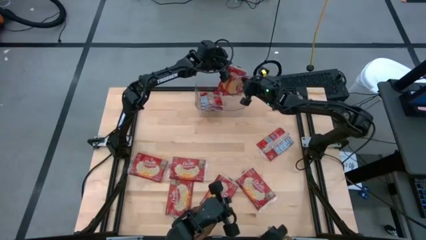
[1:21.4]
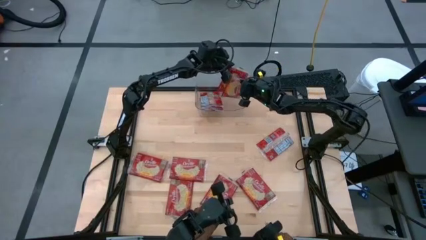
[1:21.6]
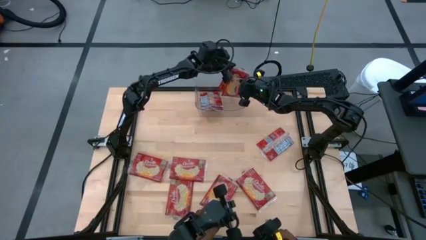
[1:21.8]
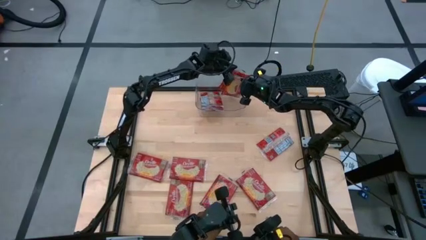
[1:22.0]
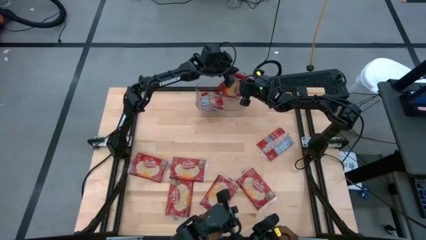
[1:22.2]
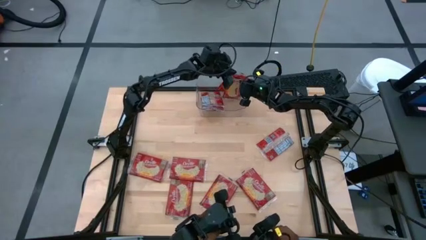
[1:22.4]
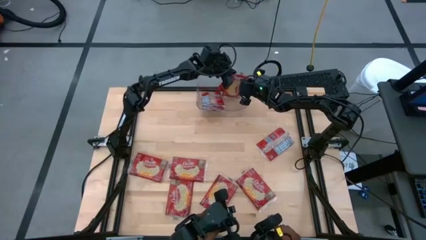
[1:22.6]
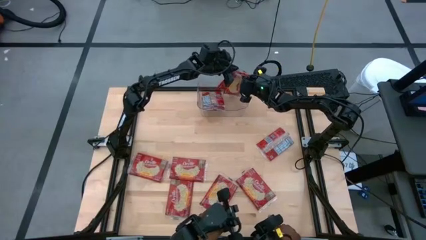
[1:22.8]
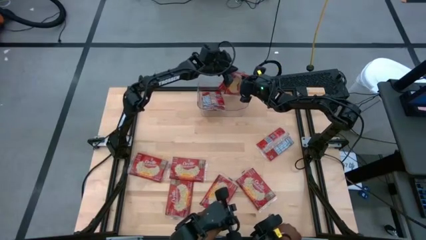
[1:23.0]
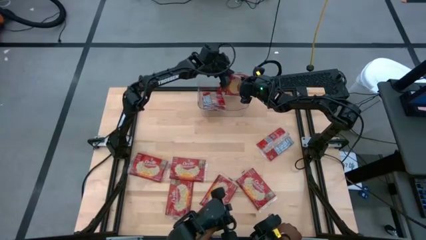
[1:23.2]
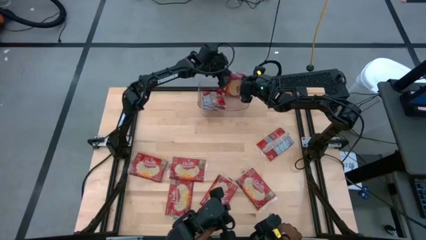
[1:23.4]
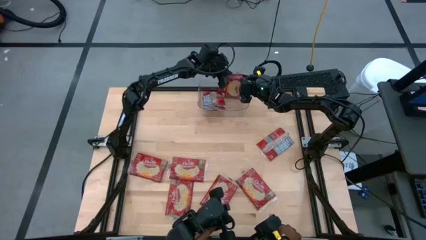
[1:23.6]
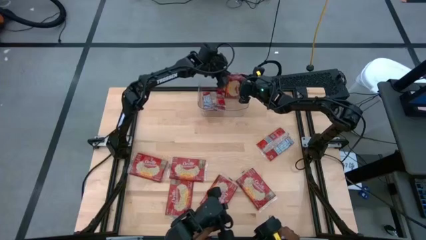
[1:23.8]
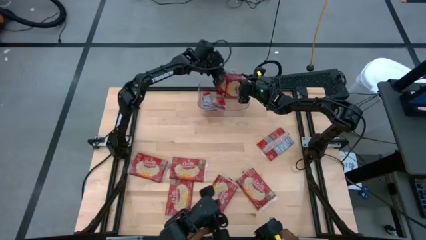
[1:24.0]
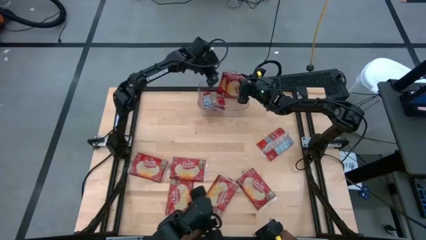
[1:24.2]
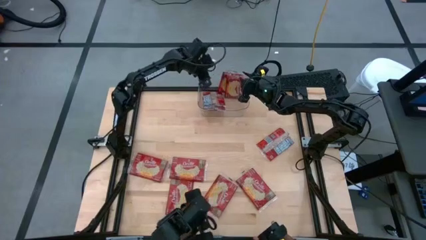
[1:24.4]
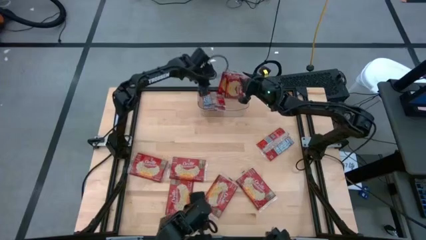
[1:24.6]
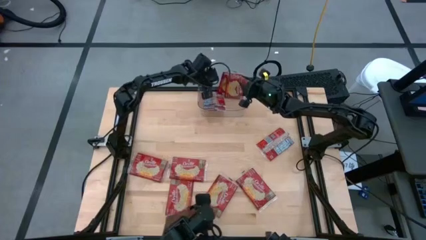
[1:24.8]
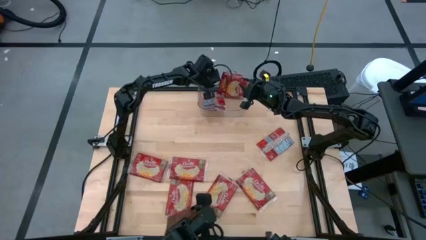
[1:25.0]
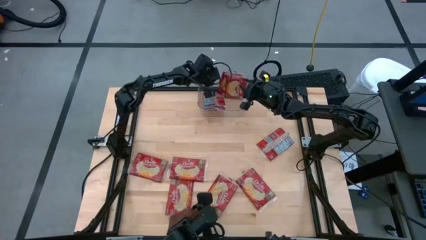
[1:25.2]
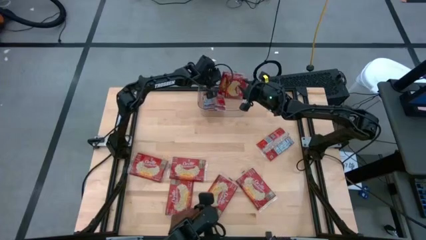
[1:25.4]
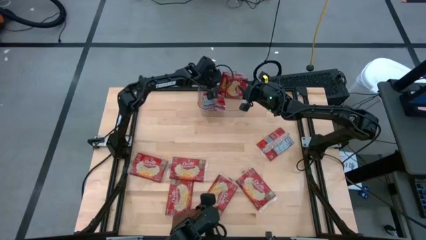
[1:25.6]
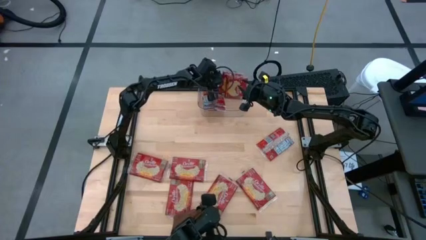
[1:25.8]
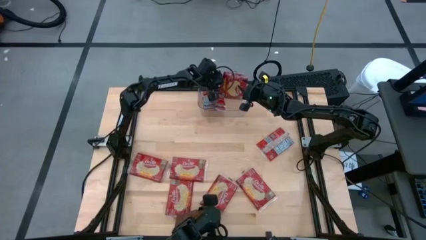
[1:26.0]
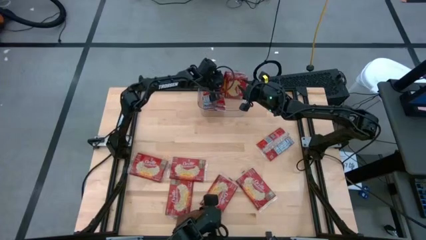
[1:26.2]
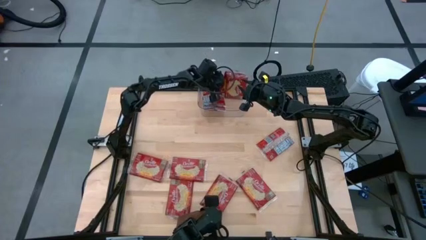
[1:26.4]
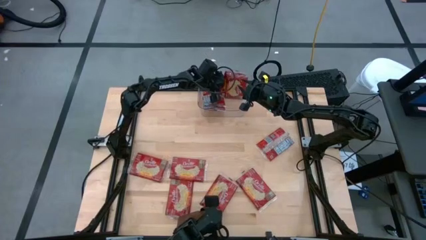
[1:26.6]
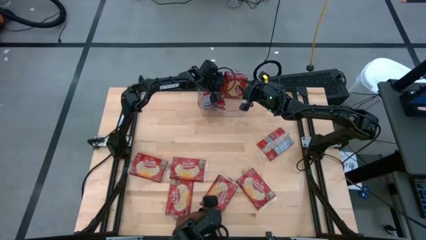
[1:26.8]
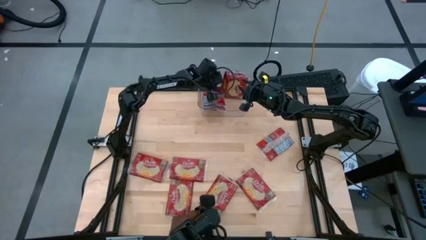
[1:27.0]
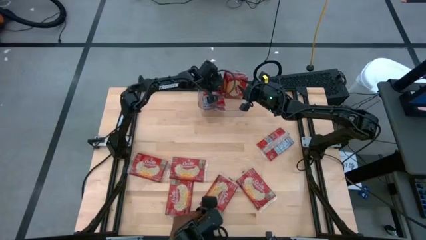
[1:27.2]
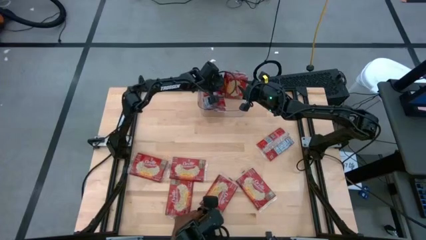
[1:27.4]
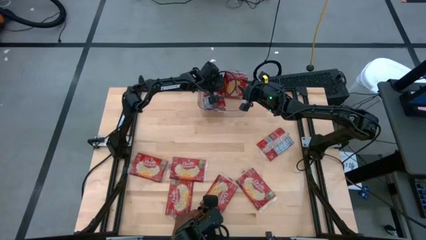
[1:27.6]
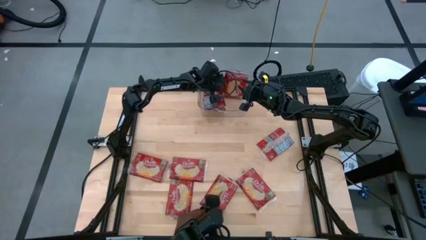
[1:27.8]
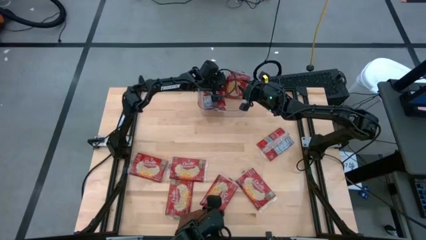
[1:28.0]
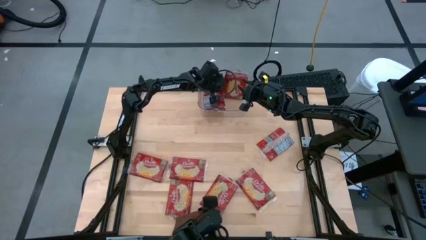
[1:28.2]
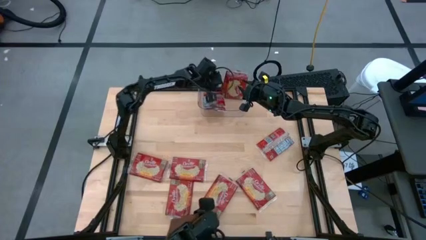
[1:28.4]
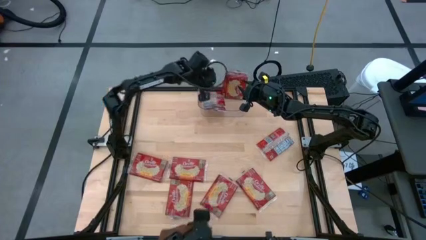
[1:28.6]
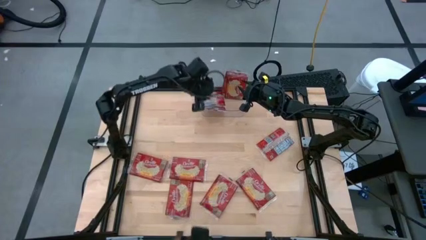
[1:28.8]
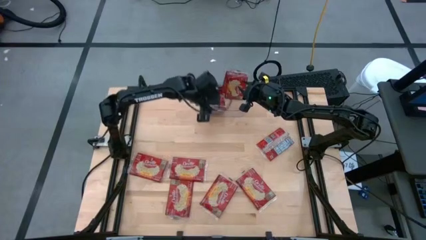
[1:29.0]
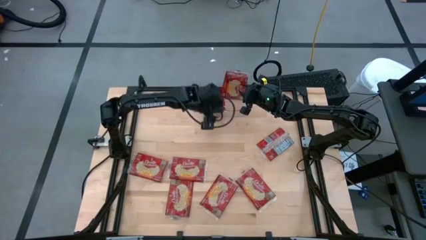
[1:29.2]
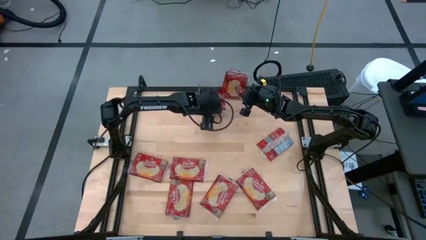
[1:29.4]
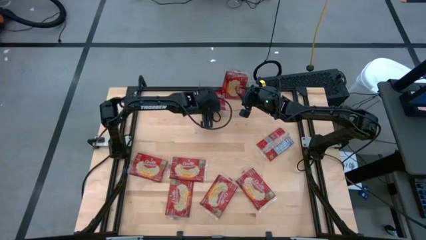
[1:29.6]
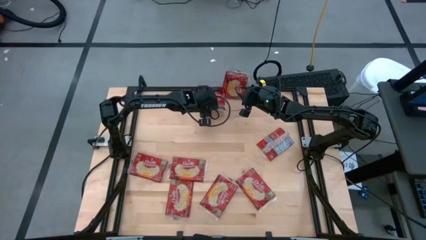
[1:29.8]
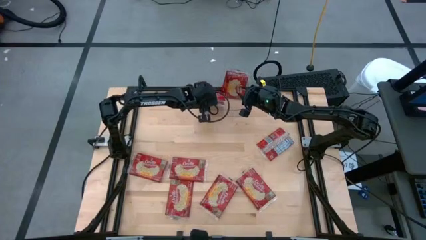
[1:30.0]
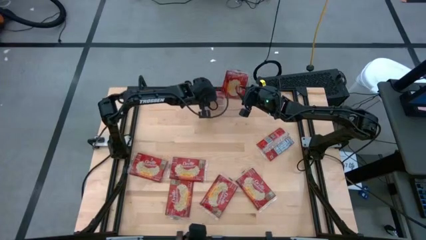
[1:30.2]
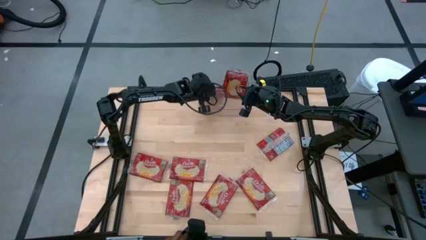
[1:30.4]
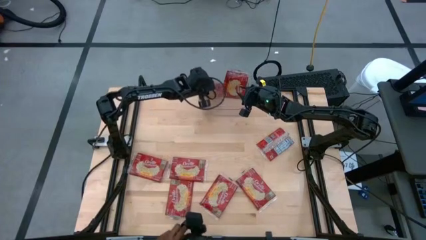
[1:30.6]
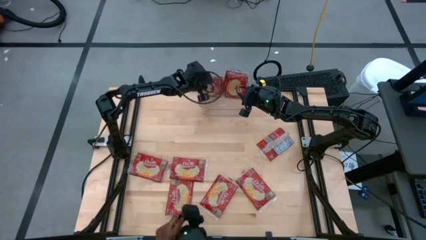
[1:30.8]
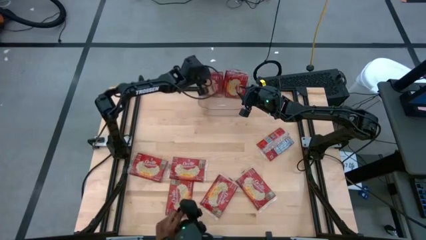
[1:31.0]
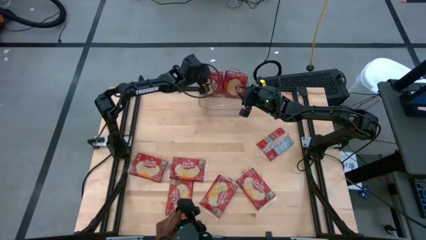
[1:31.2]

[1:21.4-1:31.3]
Task: Sort popcorn bags into baskets
Adjust the red popcorn bags in the transparent bin

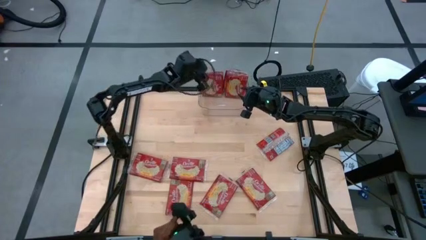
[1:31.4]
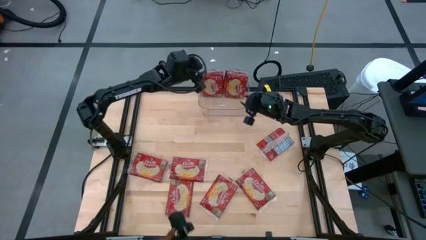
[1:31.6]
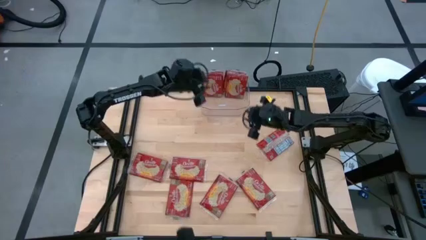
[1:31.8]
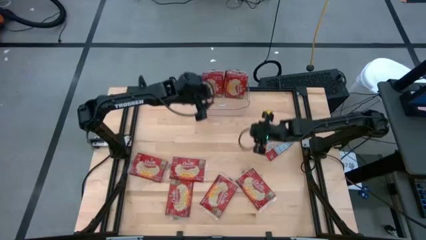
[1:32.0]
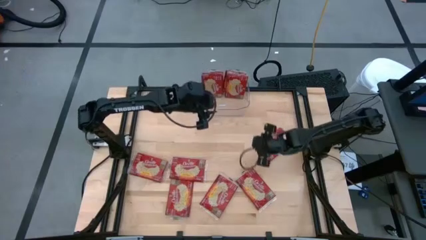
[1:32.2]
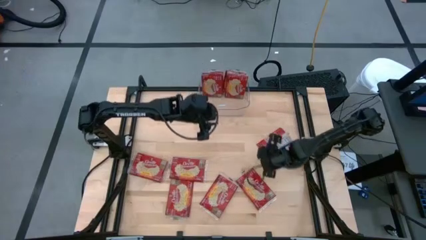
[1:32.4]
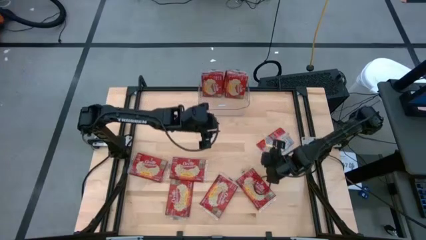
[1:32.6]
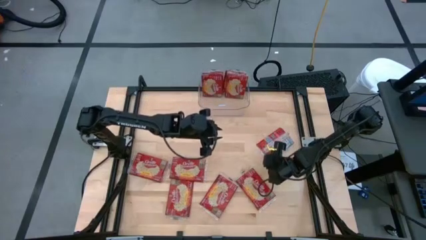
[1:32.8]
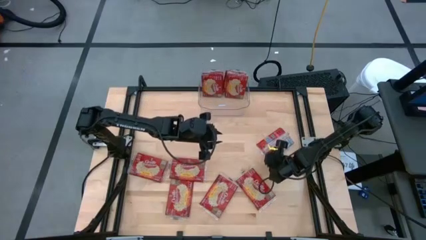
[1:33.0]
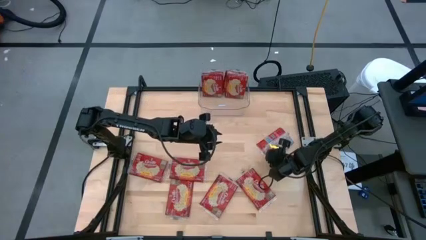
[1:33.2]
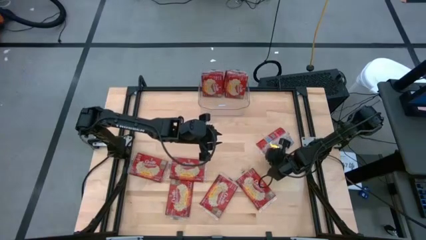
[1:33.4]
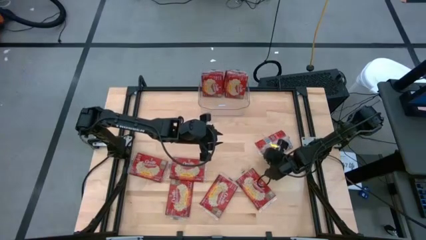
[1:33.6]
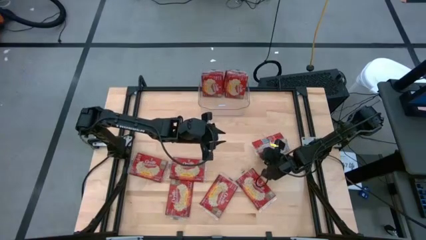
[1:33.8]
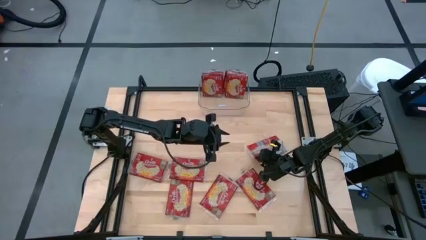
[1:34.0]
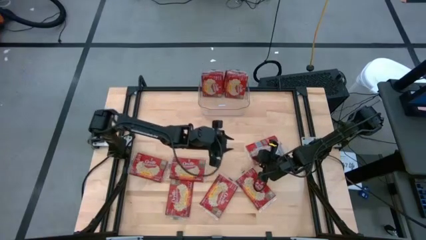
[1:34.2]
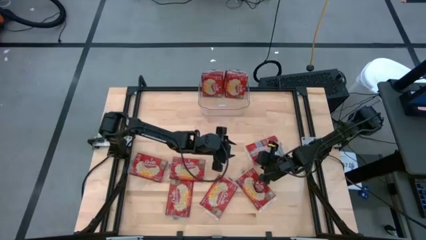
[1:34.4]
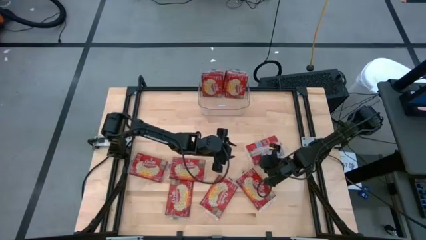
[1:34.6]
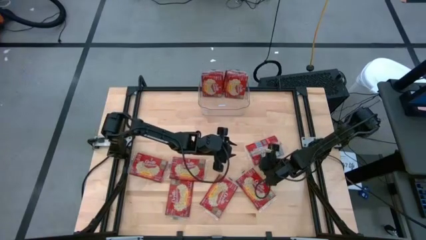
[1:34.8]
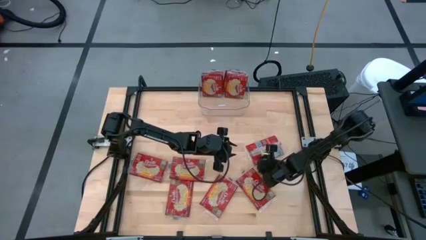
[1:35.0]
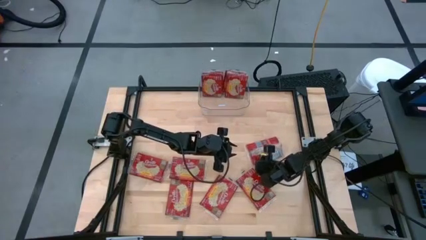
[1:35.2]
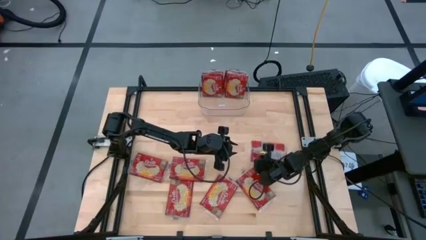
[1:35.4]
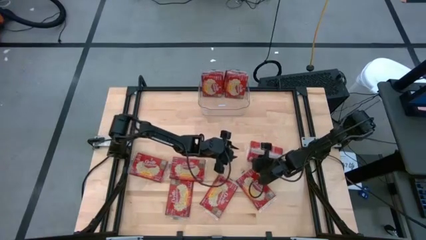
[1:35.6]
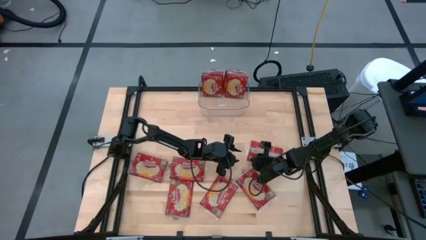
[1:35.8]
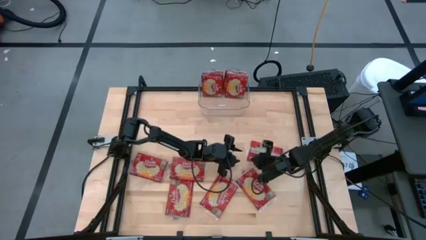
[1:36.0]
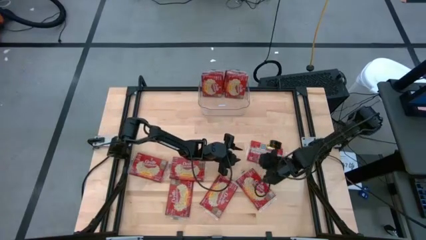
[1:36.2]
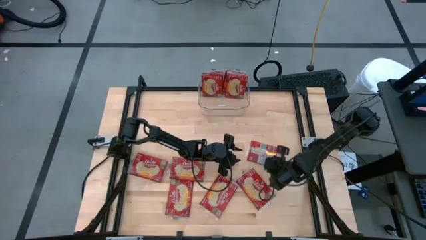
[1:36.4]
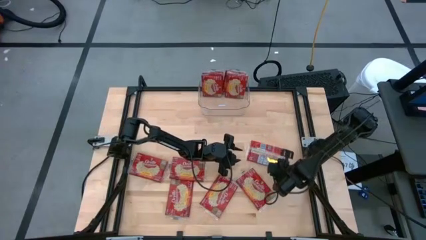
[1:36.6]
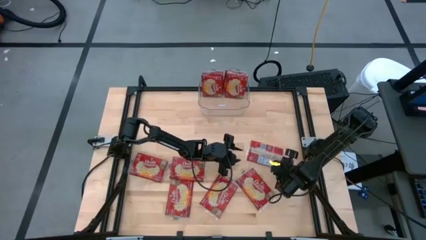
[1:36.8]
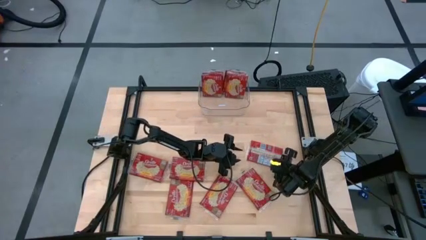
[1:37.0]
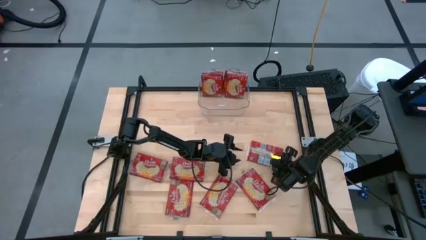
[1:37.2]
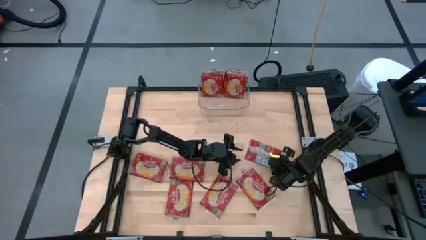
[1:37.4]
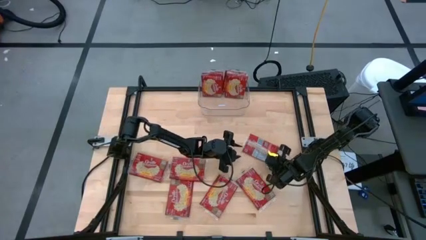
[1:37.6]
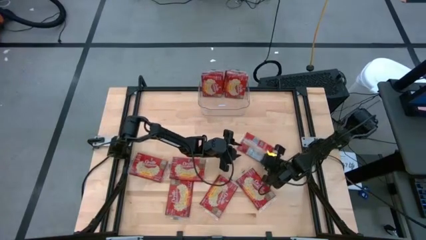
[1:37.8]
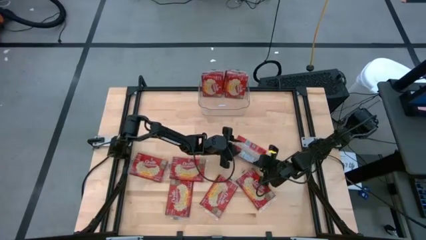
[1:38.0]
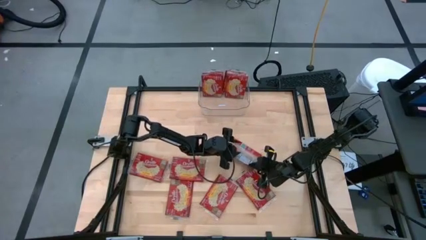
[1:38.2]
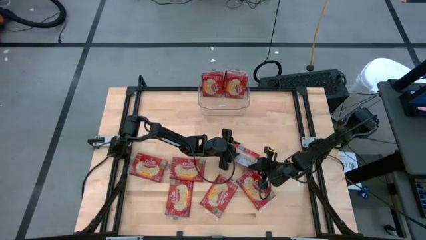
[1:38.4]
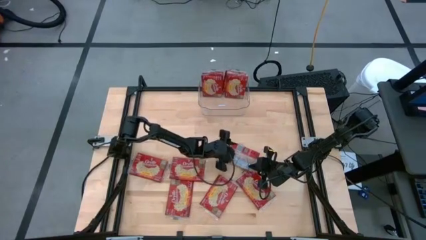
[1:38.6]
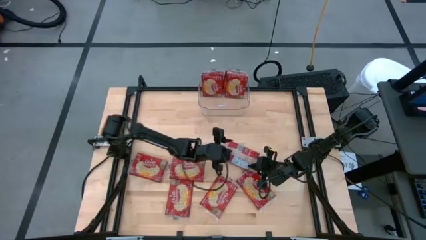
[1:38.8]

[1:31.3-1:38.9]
Put the red popcorn bag into the transparent bin
